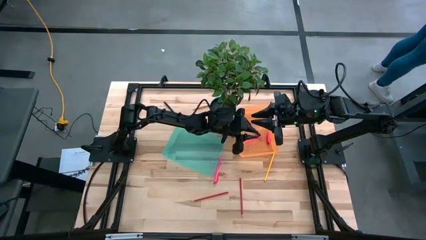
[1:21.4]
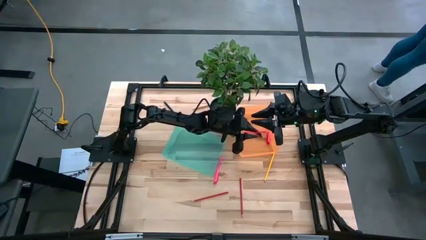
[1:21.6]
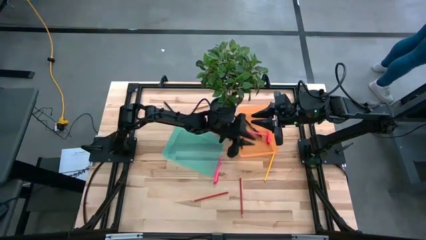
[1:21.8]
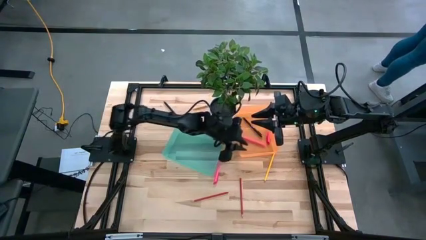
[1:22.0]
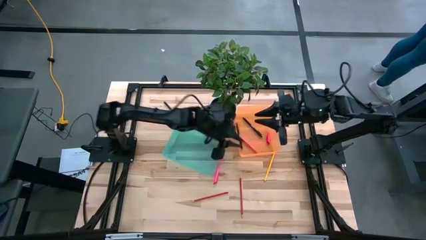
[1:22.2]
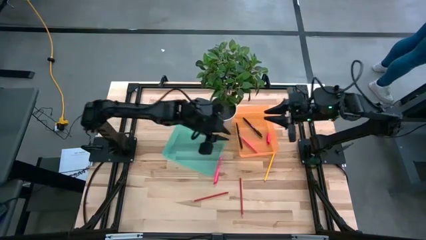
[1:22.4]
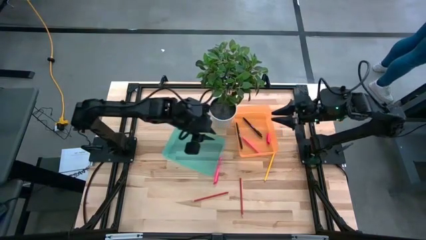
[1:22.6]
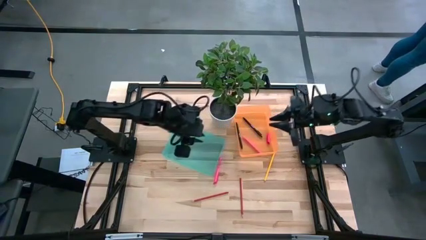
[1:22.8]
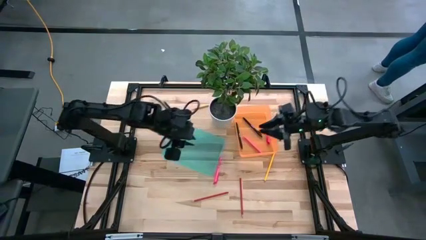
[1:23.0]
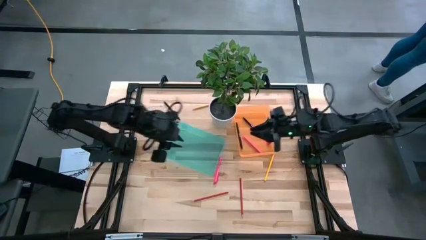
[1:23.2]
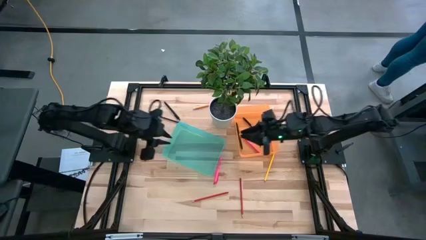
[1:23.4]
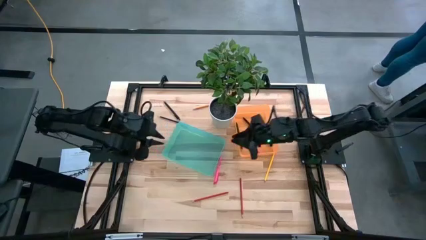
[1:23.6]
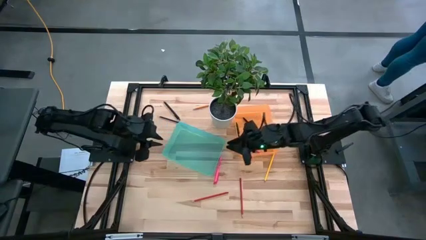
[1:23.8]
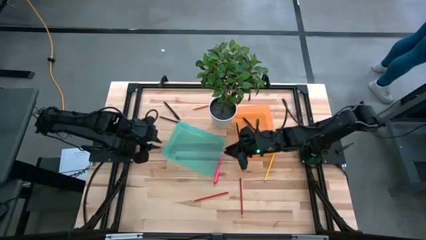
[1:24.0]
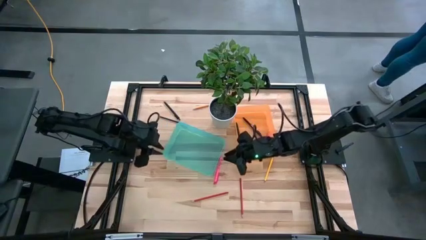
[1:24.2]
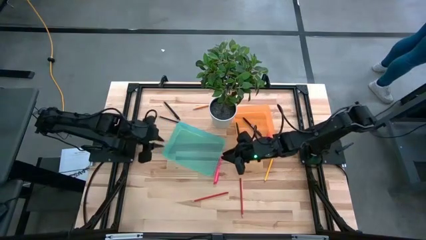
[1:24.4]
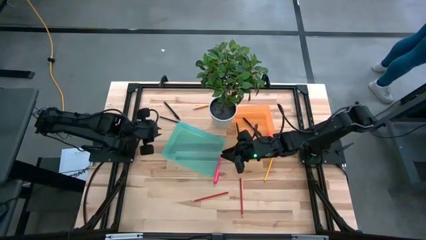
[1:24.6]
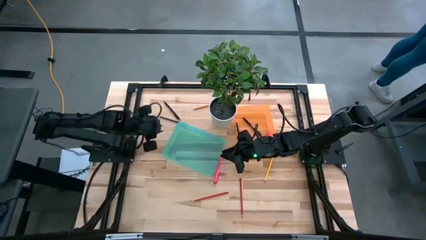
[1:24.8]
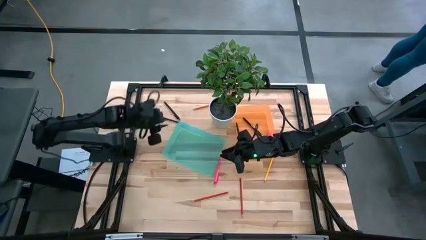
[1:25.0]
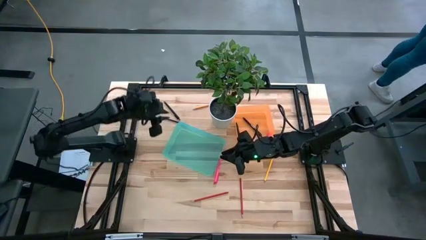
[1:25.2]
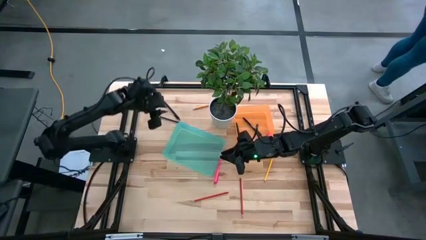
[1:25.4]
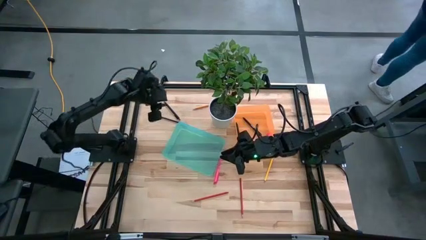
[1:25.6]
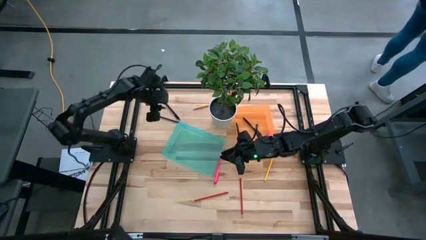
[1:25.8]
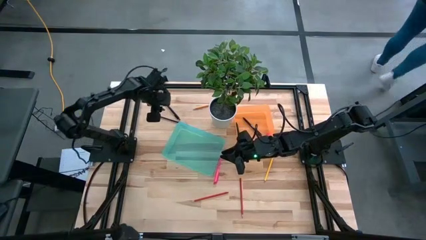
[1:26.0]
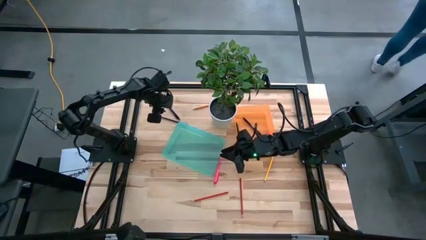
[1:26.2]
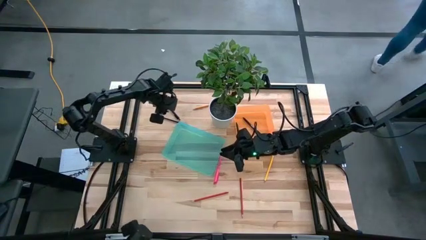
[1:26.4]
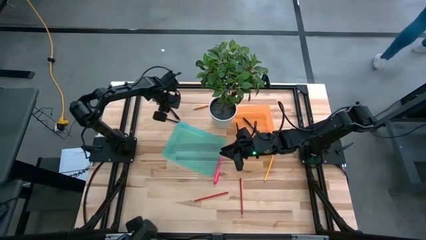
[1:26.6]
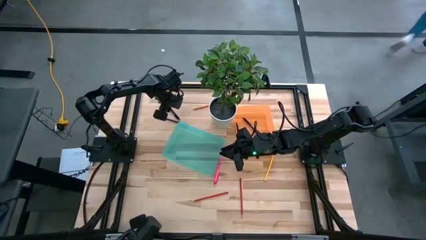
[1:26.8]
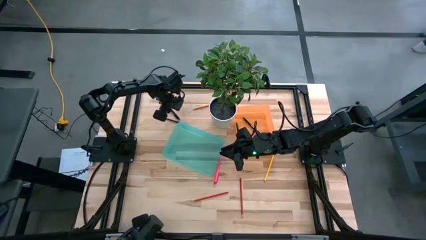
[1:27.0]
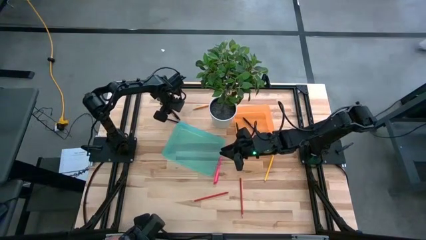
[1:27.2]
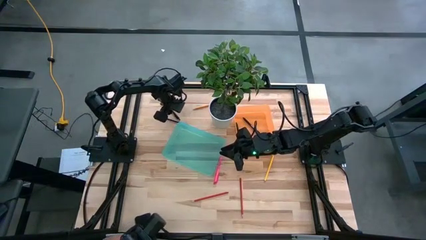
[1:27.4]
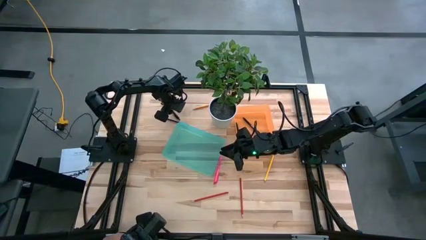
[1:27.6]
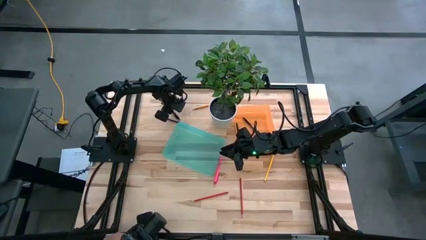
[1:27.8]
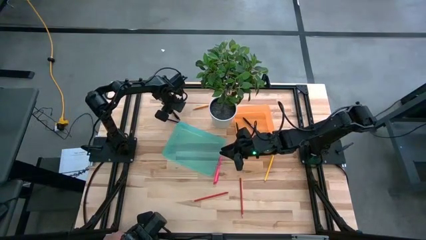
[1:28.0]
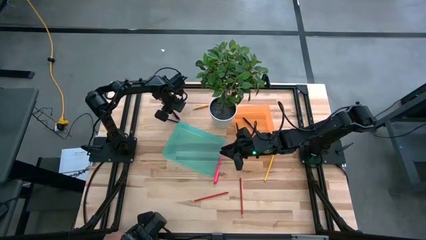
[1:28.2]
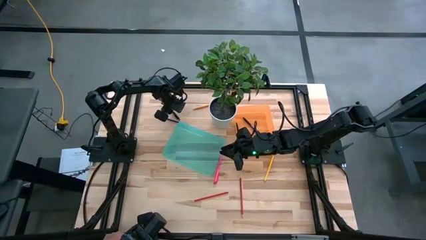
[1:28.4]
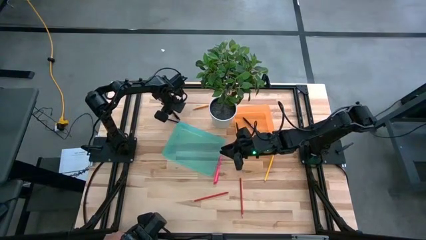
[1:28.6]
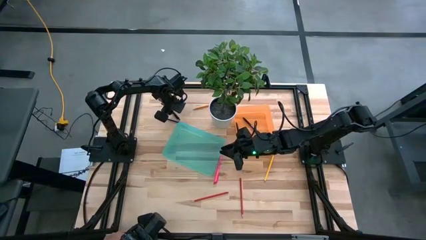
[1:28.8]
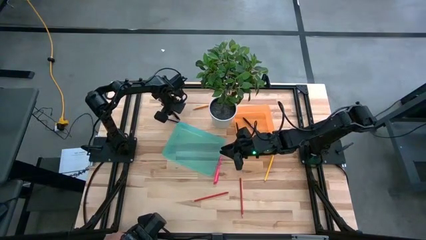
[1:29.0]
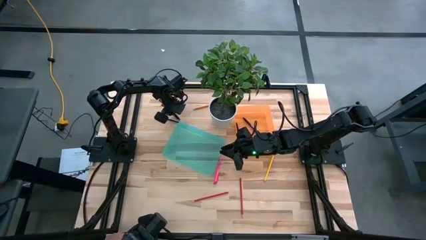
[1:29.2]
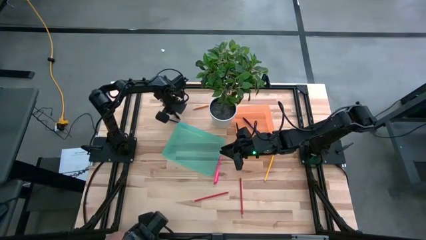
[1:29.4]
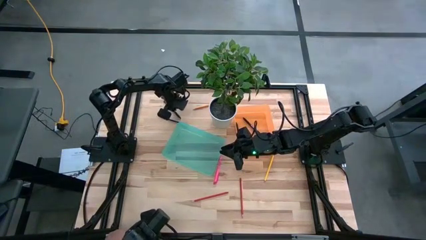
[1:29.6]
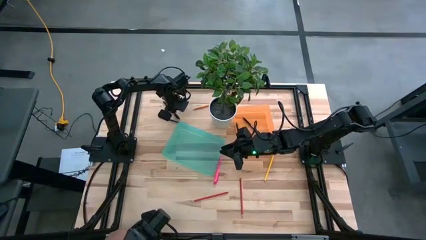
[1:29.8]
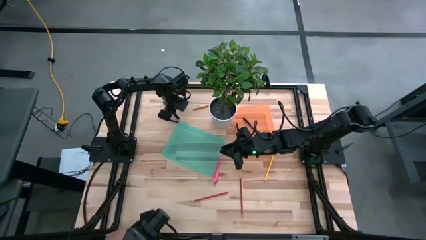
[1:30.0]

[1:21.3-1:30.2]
Task: Sort pens & pencils
Put the black pen into the orange bin

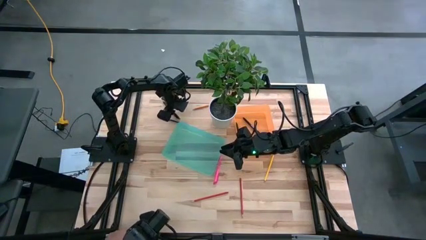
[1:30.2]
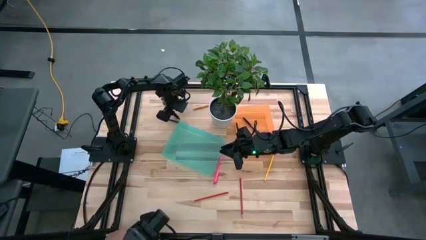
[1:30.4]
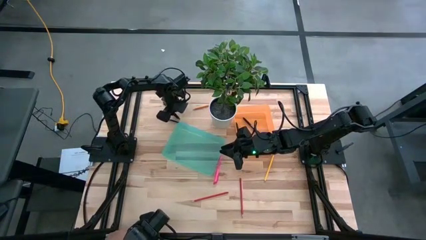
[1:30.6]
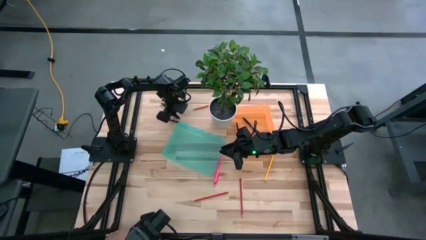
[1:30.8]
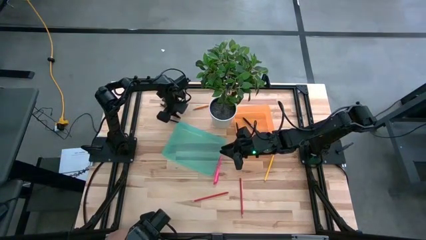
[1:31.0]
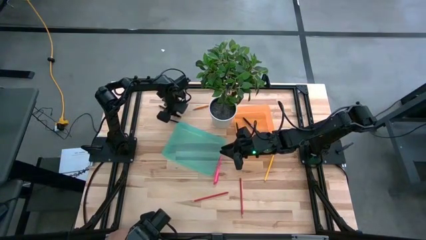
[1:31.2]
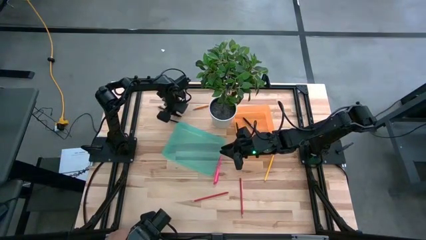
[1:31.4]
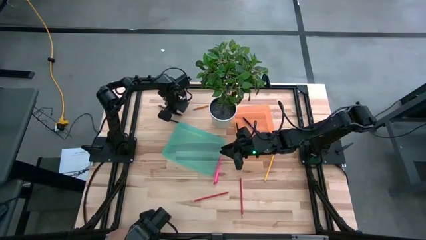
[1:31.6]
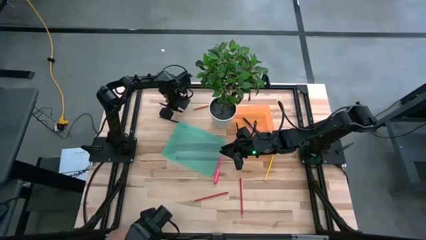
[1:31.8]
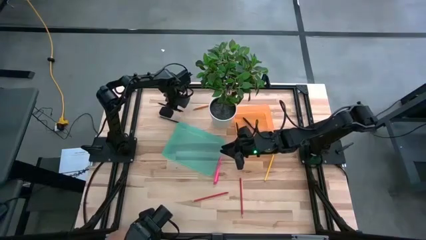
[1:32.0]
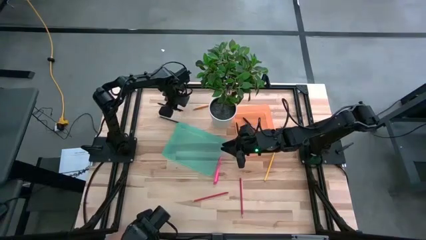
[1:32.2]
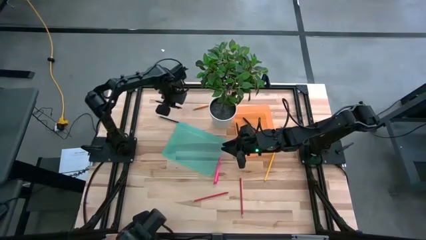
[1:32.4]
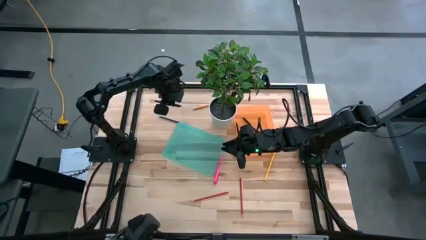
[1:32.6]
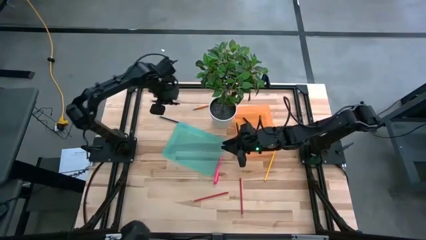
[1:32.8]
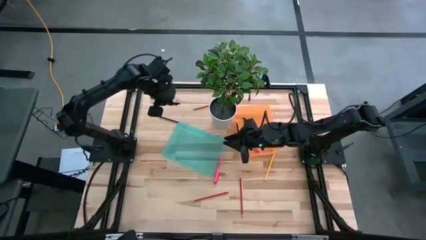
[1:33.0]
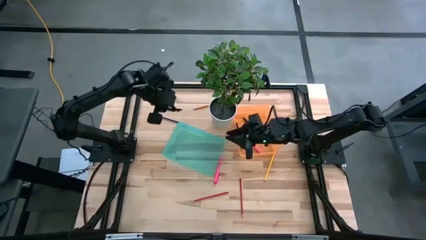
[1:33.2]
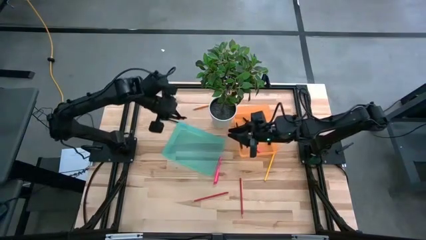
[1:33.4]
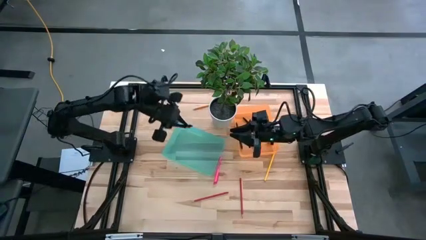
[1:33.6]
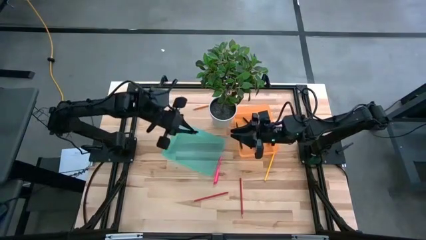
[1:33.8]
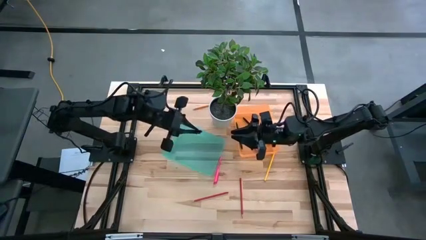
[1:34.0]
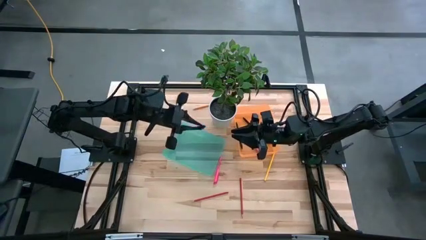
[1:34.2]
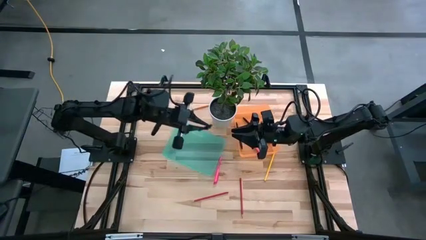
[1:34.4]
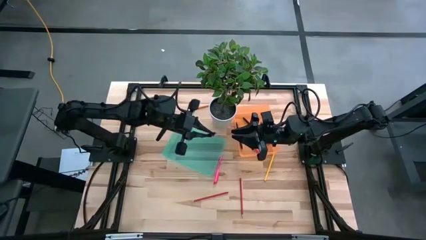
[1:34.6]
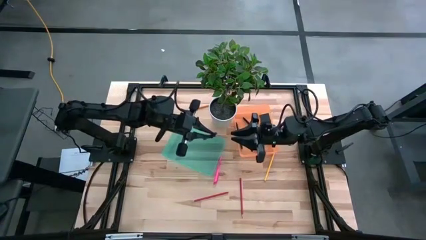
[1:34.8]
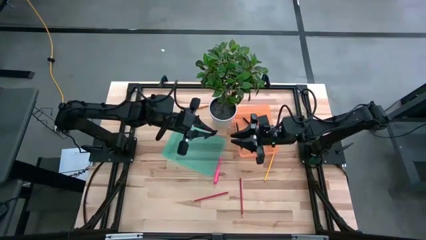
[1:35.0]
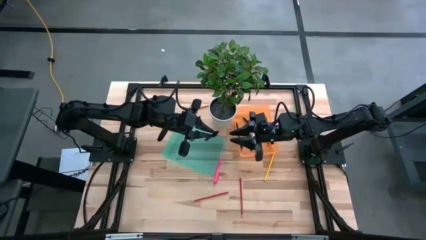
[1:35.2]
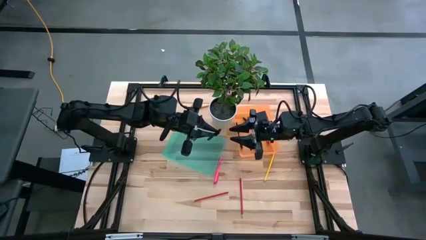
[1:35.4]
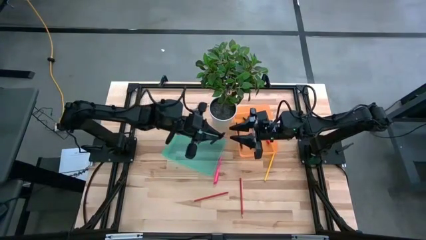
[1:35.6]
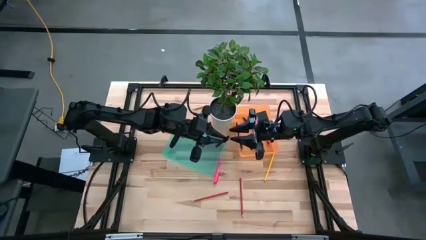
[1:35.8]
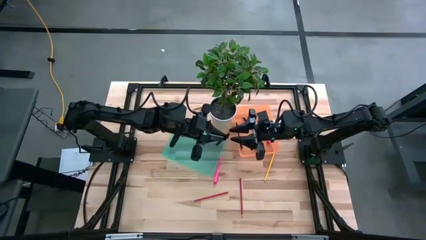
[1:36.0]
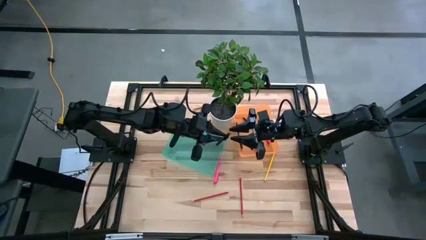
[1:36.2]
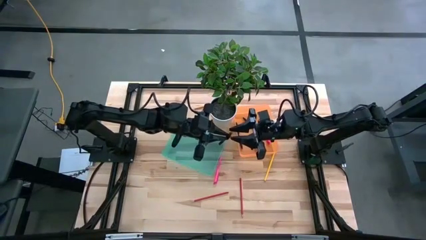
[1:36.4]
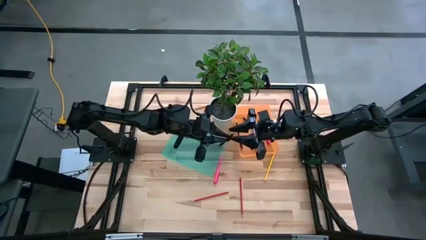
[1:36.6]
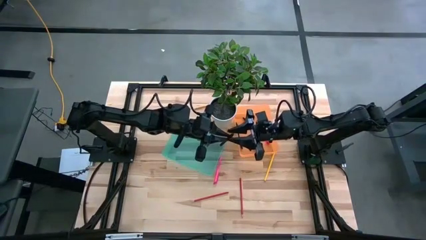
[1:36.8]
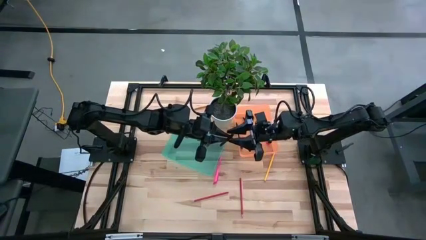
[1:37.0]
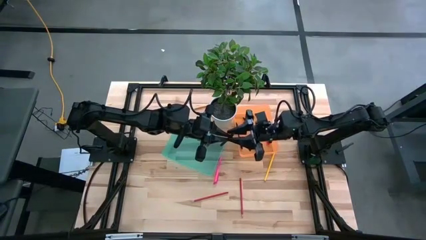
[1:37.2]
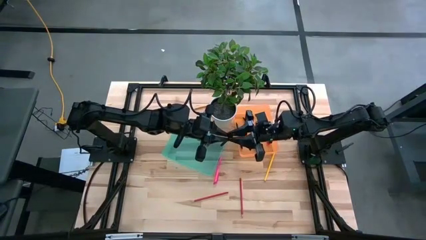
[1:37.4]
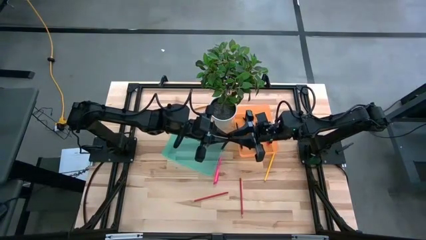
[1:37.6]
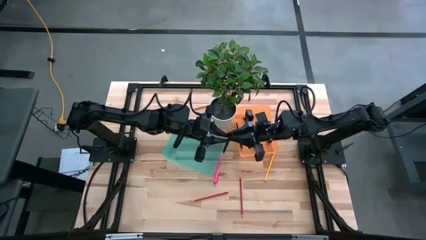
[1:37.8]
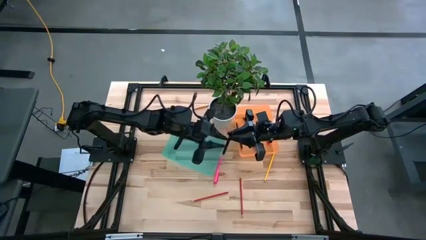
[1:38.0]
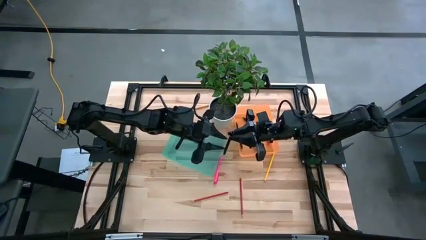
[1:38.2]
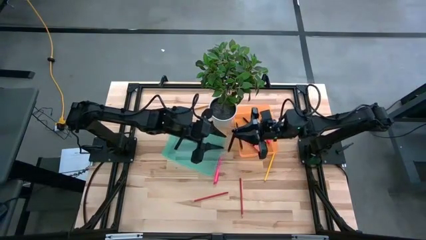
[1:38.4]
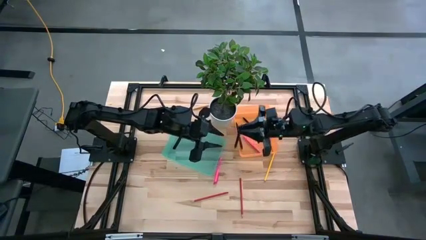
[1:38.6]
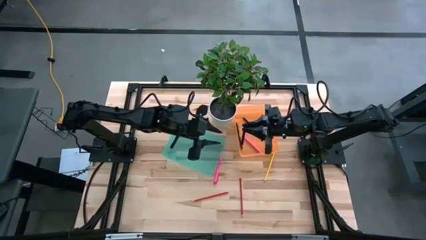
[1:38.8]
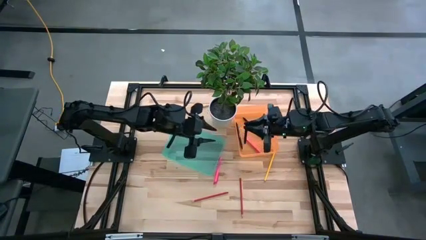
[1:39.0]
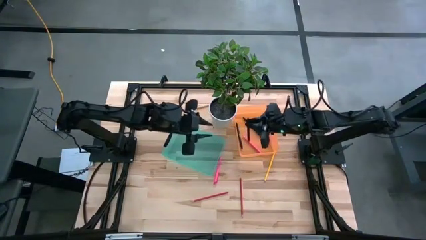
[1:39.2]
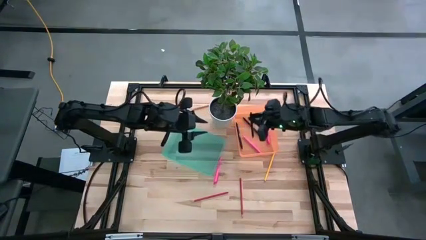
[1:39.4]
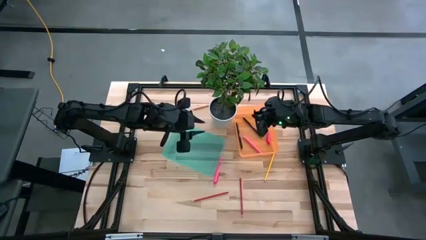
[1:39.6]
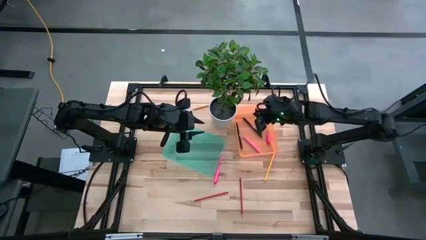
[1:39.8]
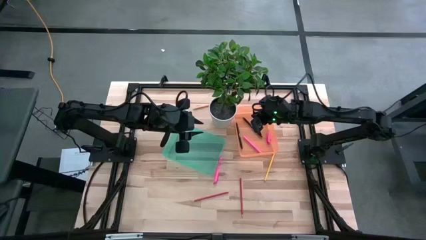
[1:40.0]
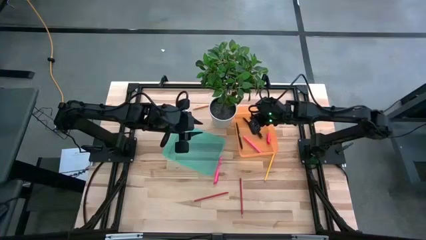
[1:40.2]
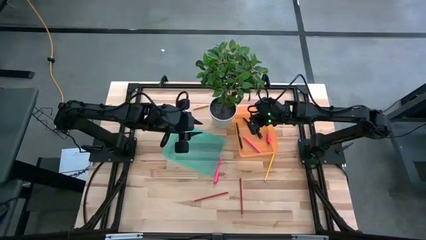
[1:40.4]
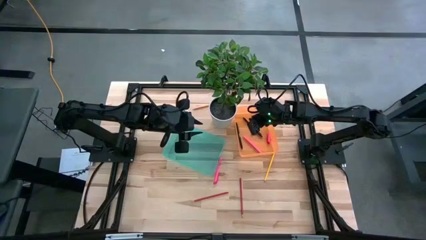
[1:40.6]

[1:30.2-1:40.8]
Put the black pen into the orange bin
